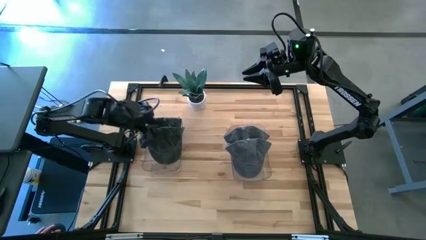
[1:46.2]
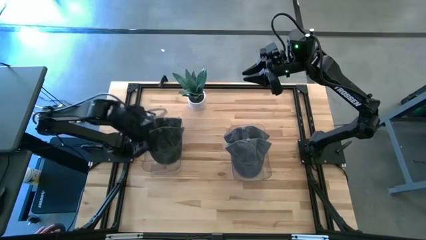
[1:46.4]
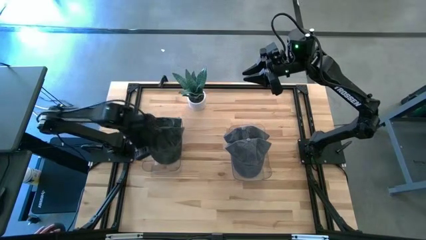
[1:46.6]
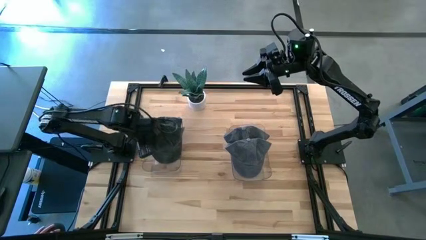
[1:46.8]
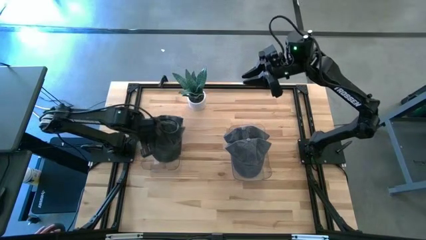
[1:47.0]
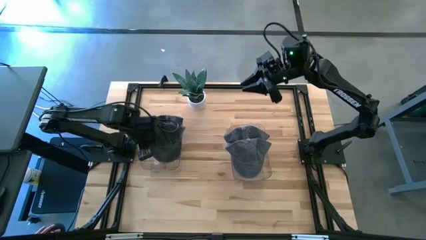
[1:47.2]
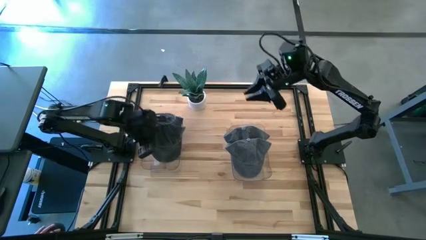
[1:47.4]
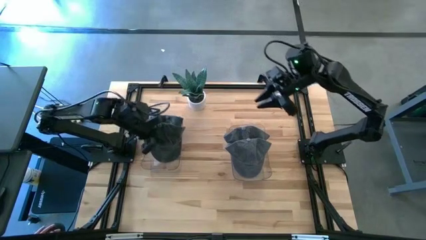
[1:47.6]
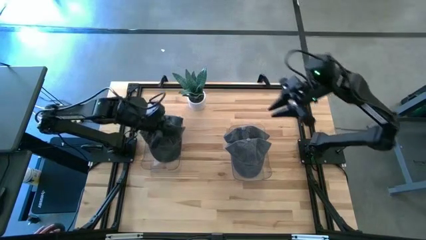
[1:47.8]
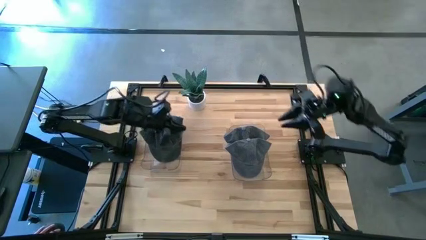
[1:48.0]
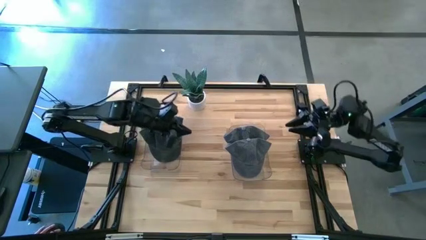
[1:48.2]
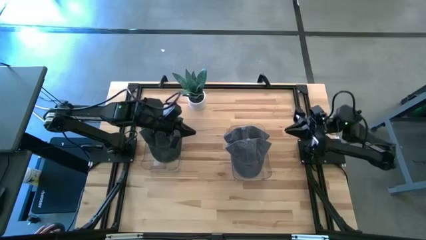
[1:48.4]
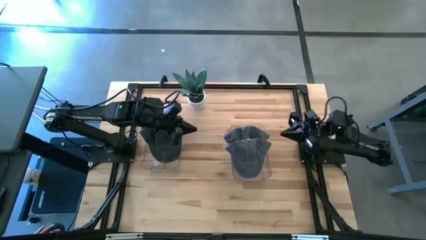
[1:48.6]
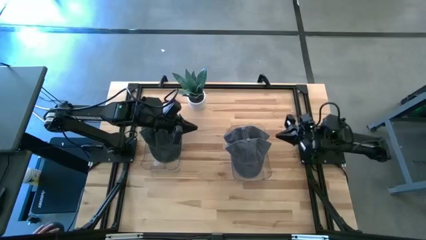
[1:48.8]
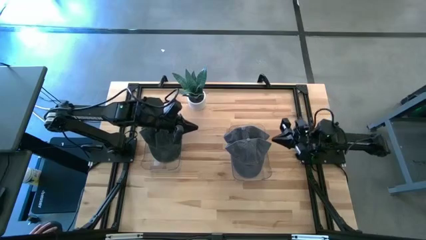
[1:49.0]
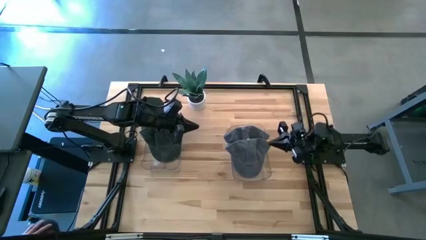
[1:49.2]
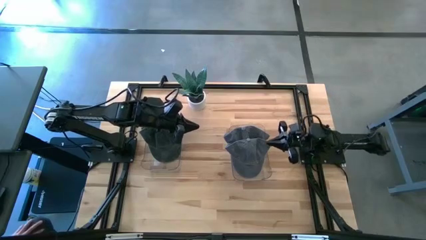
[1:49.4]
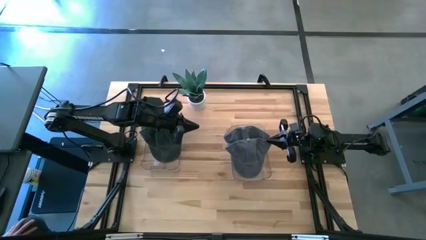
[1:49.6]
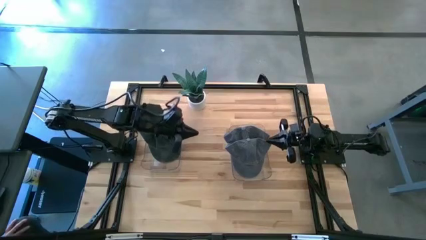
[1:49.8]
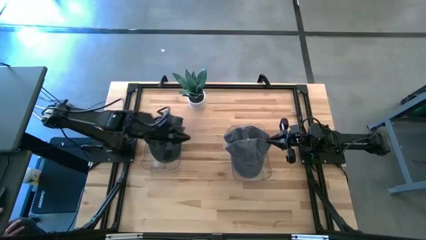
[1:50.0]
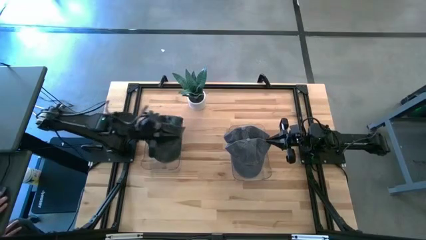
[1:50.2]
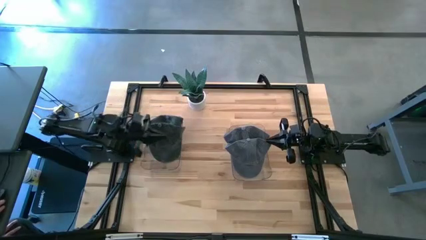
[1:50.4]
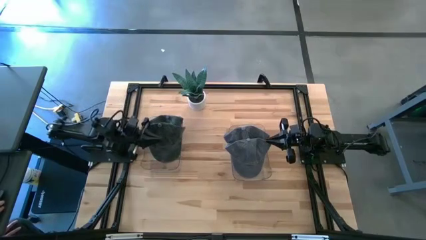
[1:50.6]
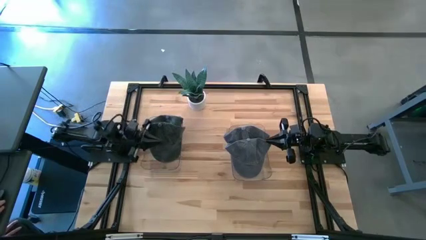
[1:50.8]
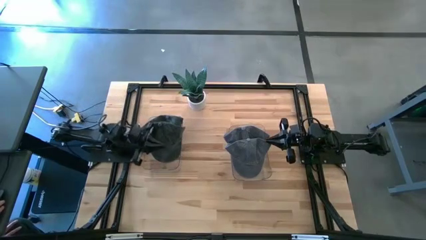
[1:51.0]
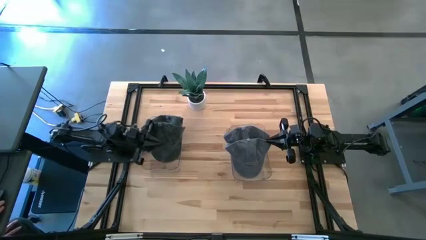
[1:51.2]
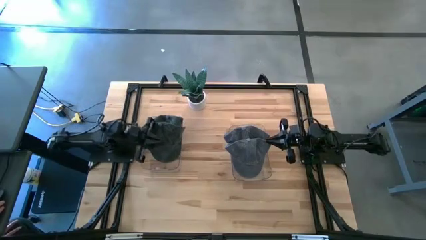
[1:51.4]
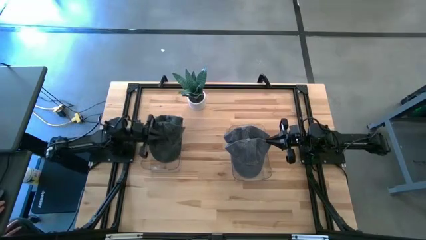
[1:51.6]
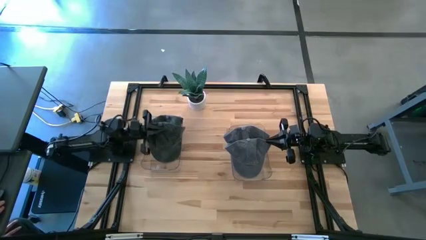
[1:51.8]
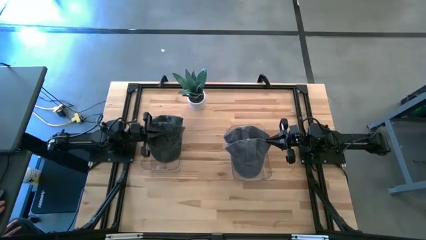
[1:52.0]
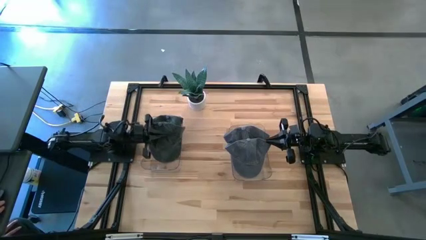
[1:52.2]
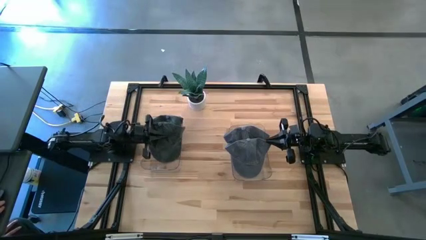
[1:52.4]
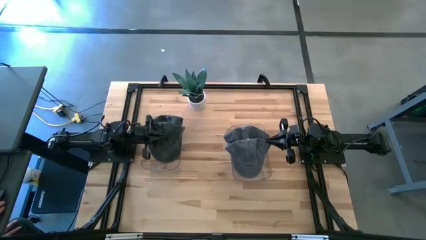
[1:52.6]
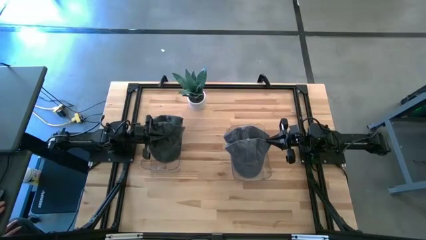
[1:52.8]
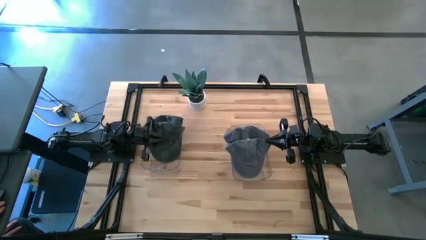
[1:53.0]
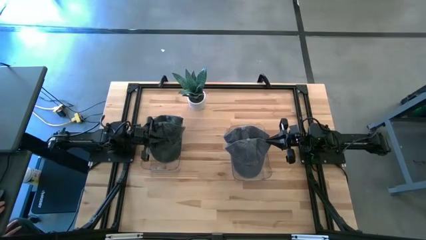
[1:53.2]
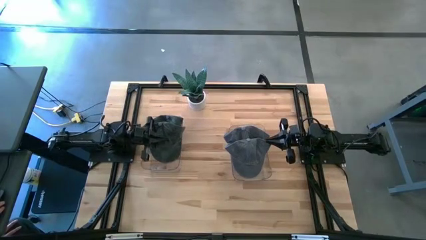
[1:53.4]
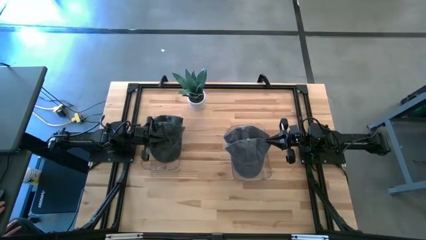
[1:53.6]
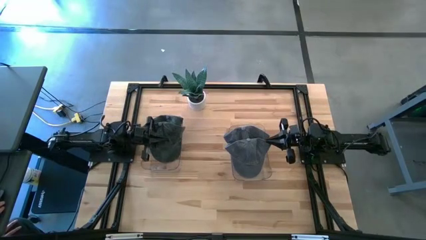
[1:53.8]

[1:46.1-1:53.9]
Task: Pick & Place hat
Return to Home Position

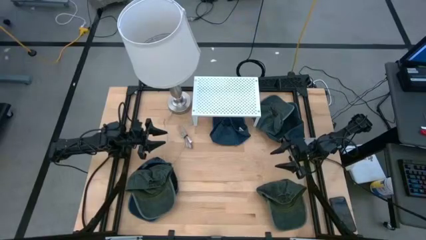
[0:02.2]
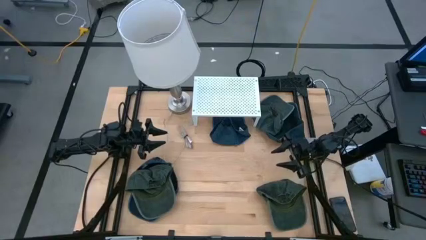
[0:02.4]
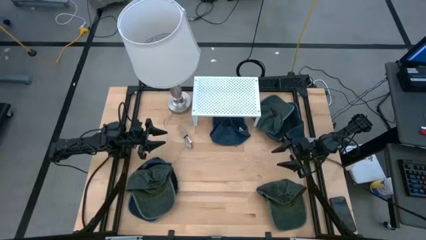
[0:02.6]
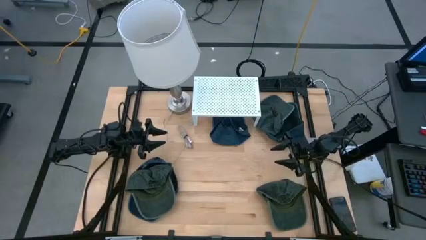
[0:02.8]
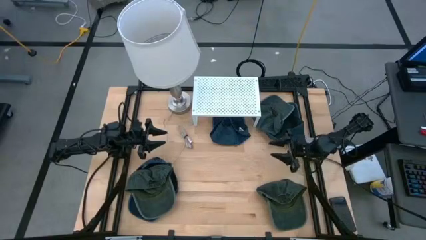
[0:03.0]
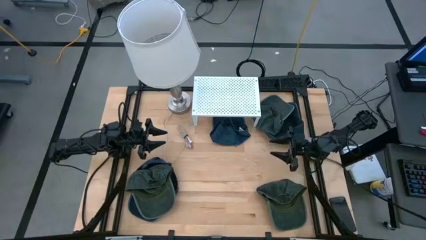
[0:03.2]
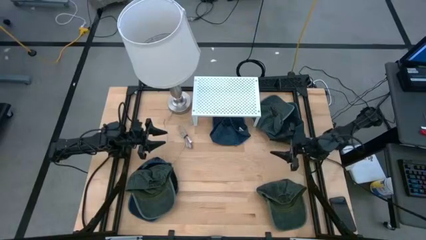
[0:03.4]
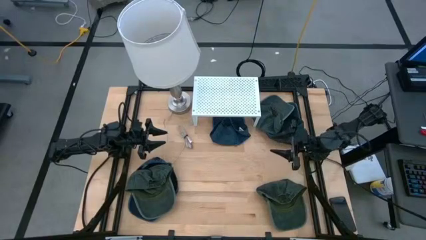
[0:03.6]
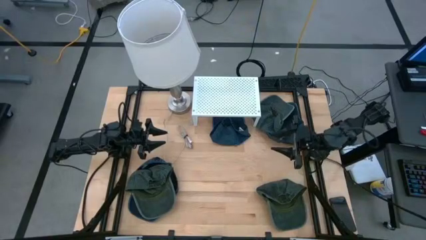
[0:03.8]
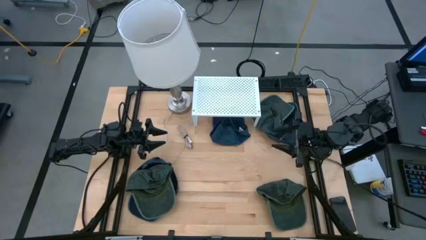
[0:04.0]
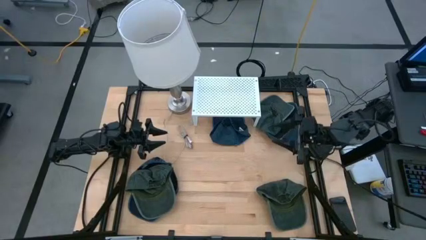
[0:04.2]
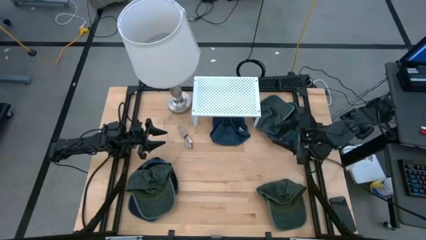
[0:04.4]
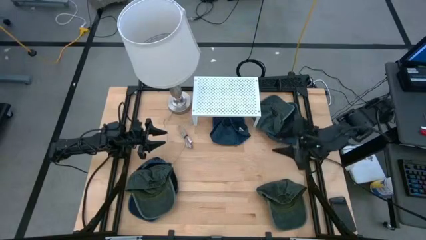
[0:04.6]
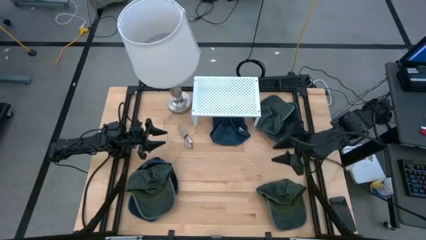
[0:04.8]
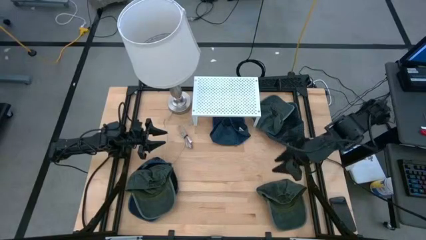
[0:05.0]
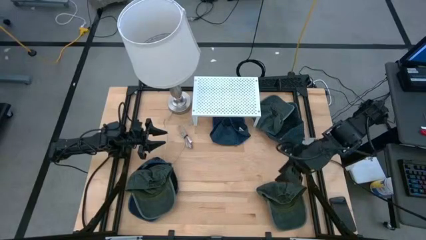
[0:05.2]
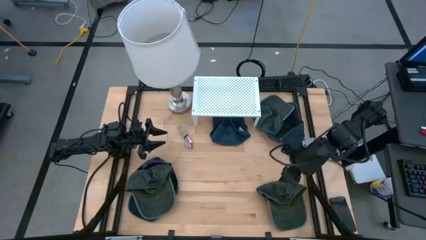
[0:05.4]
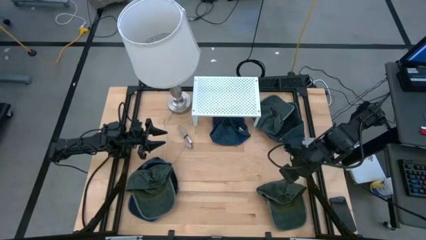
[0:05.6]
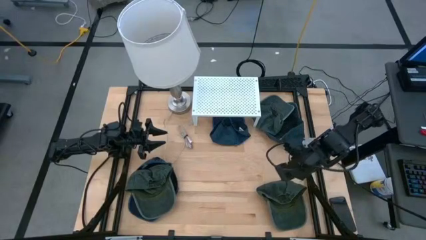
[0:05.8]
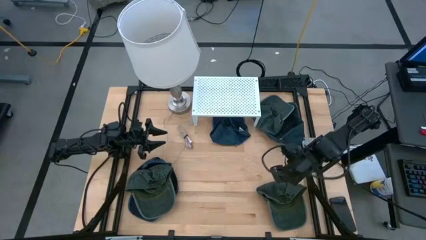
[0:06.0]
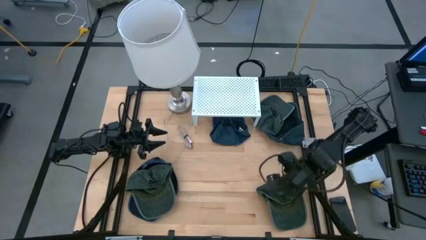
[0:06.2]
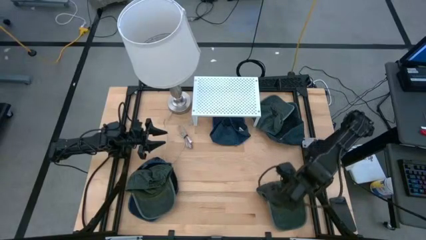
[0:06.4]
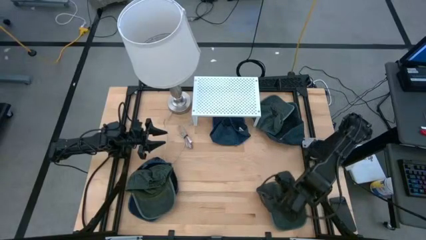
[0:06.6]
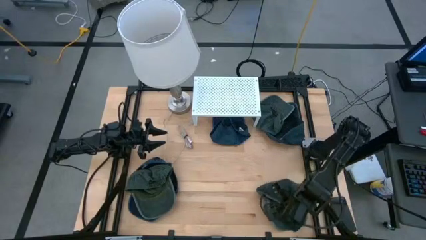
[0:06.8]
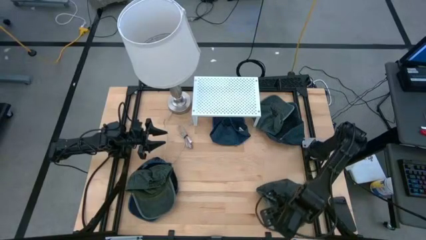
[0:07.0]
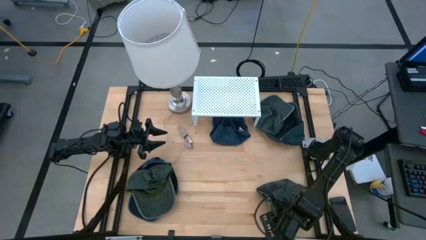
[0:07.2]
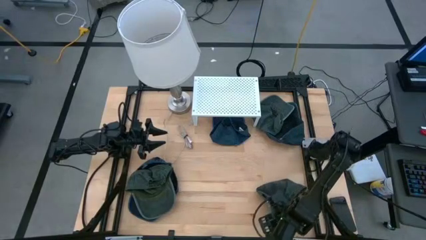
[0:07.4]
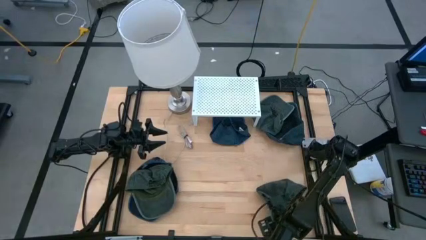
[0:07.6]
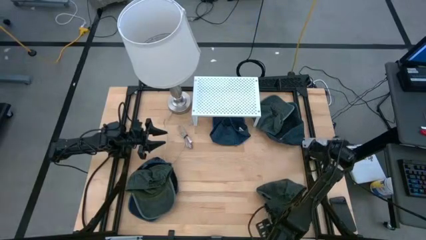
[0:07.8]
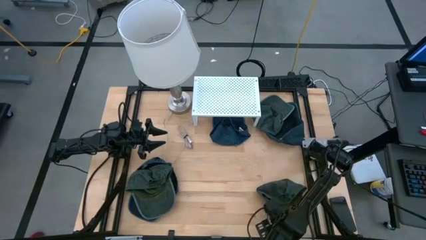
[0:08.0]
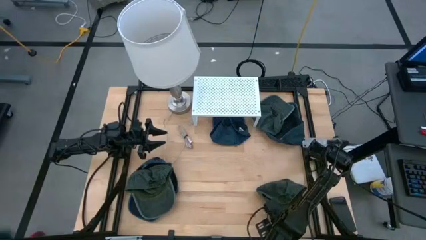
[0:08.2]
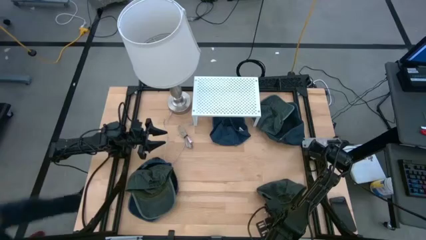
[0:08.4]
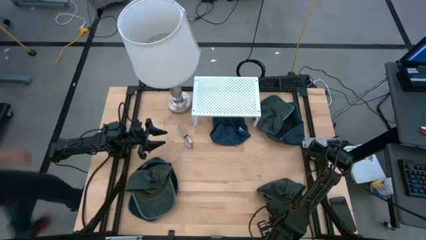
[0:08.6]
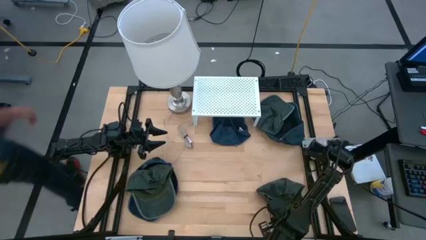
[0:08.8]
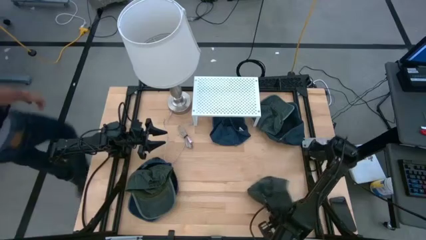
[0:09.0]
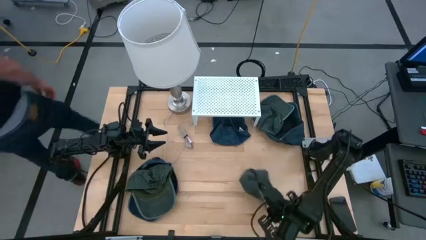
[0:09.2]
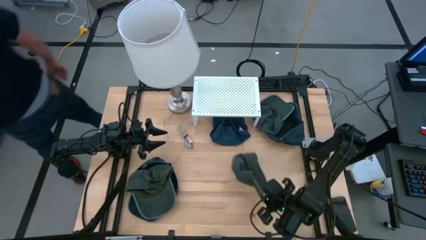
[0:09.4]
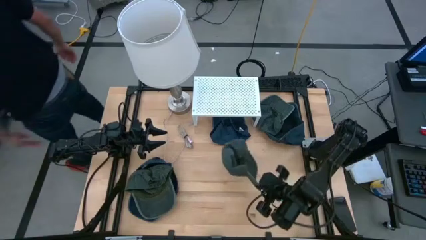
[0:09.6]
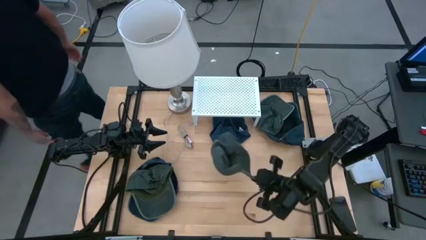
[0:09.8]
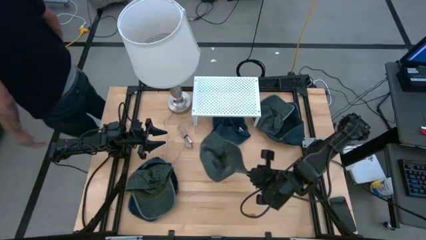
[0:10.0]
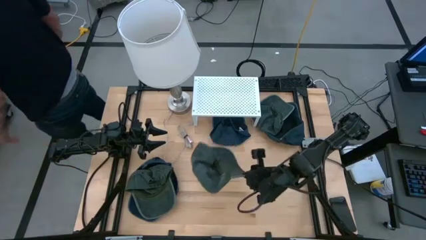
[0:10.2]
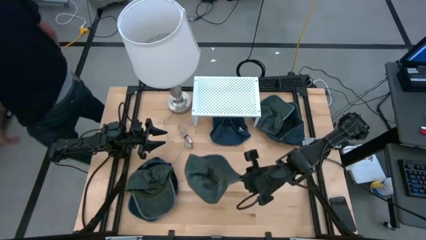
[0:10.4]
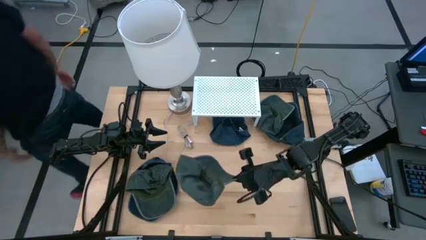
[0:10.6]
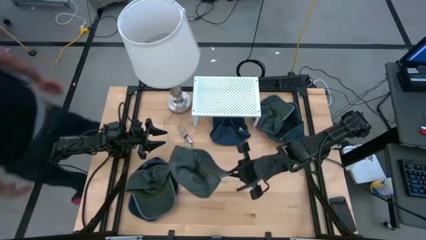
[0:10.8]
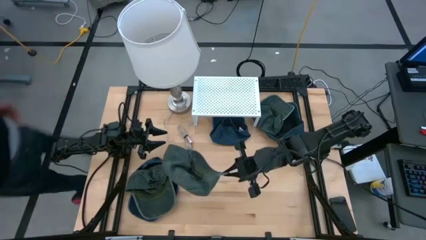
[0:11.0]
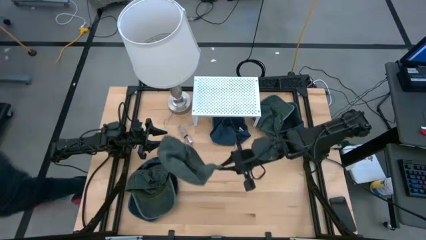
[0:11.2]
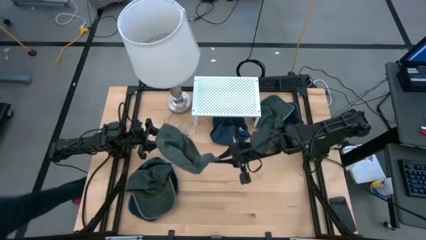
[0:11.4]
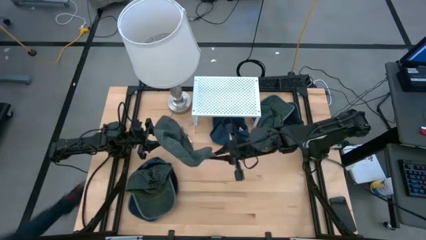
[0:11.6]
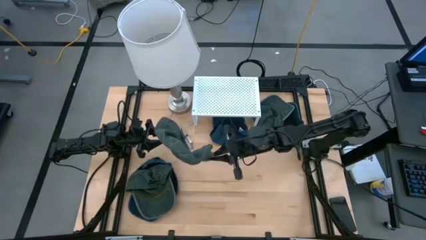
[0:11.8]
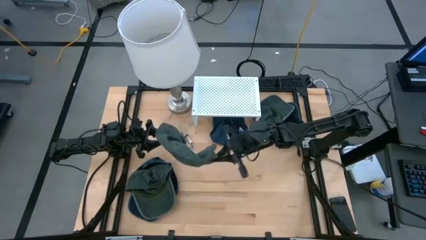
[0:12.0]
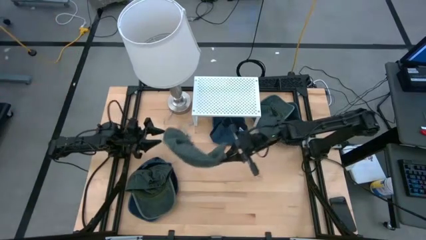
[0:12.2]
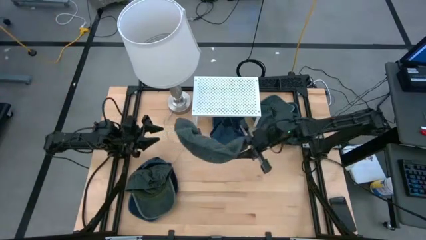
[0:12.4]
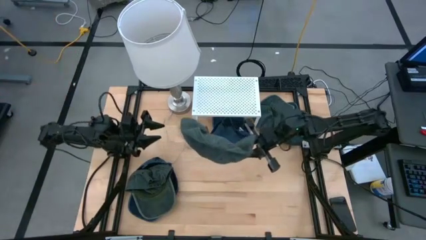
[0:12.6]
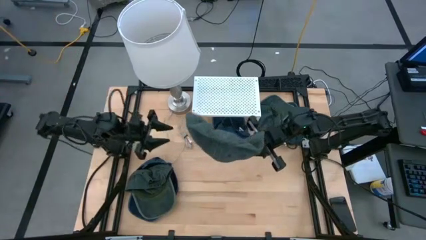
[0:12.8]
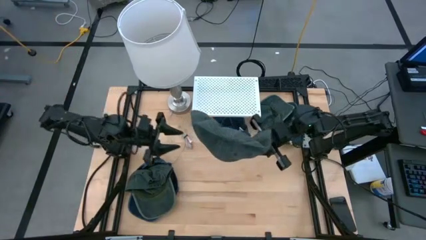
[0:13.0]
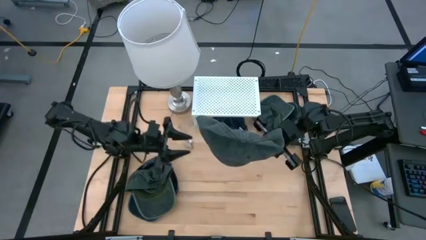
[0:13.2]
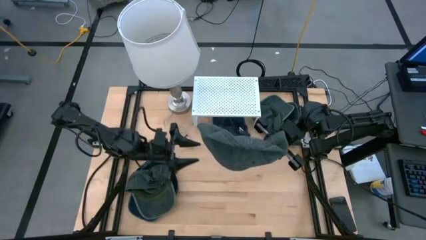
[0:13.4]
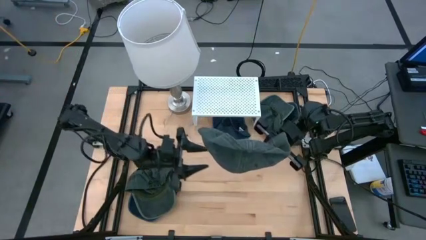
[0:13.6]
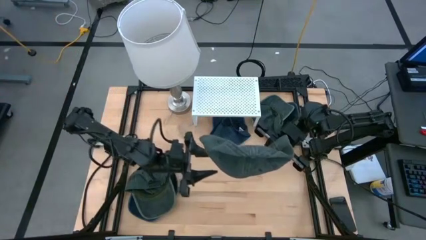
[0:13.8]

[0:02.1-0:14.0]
Task: Pick & Place hat
Put the bottom right gray cap on the shelf
